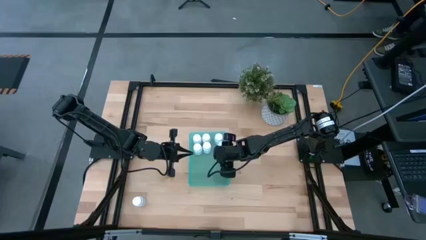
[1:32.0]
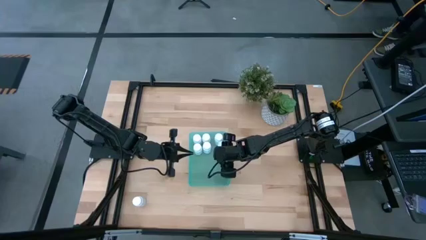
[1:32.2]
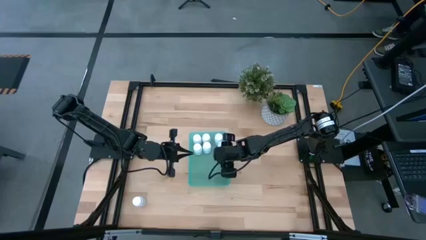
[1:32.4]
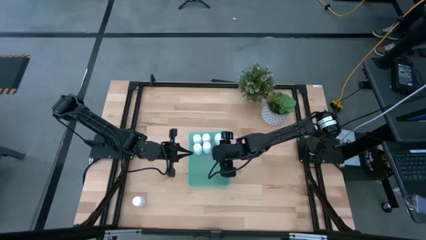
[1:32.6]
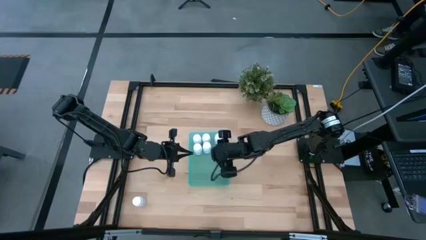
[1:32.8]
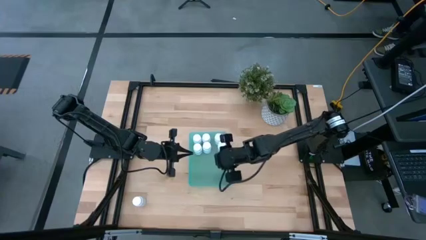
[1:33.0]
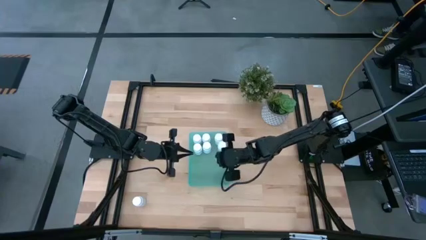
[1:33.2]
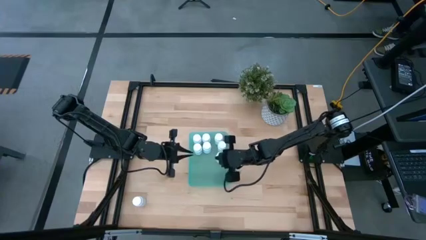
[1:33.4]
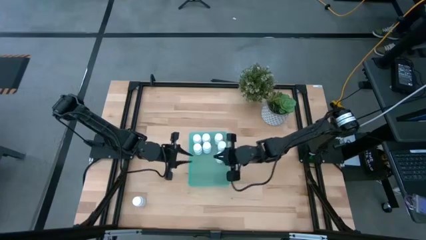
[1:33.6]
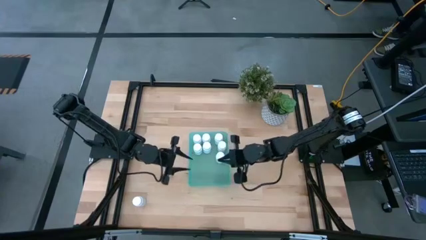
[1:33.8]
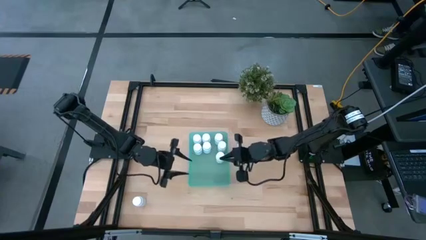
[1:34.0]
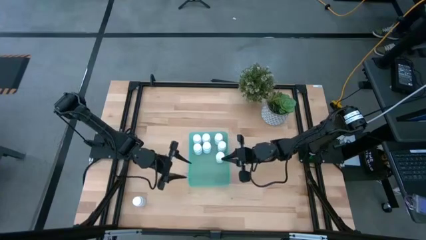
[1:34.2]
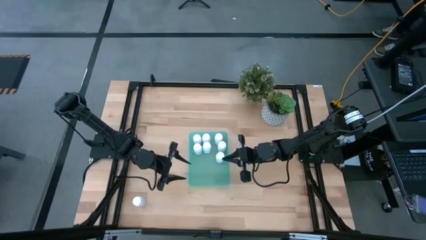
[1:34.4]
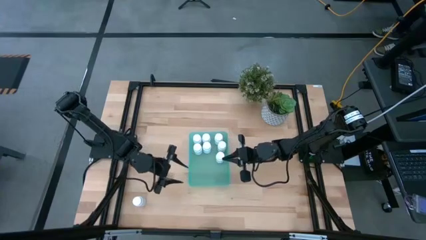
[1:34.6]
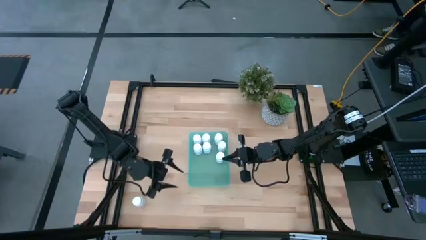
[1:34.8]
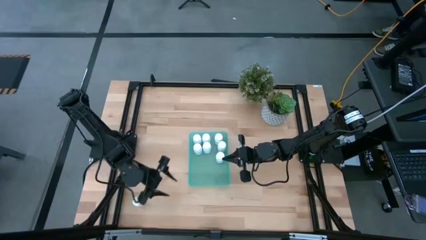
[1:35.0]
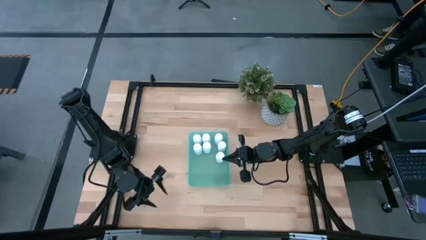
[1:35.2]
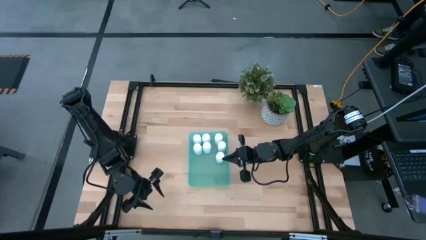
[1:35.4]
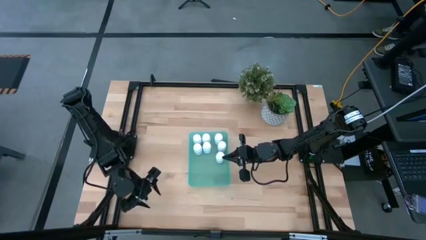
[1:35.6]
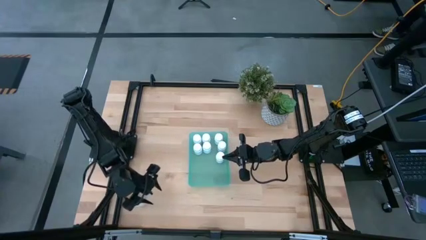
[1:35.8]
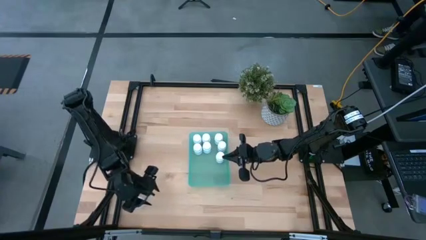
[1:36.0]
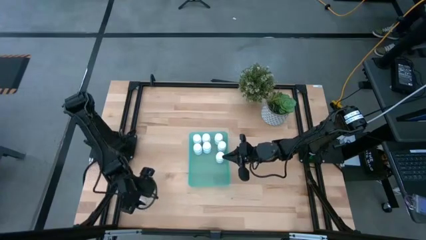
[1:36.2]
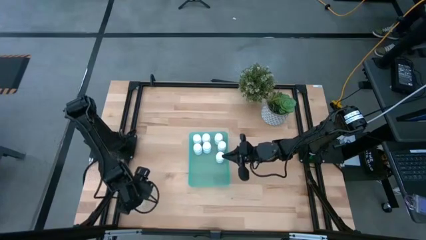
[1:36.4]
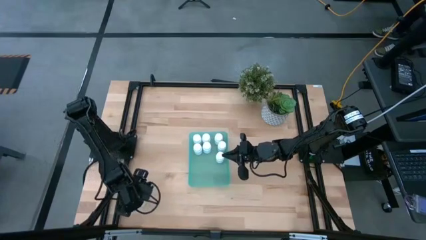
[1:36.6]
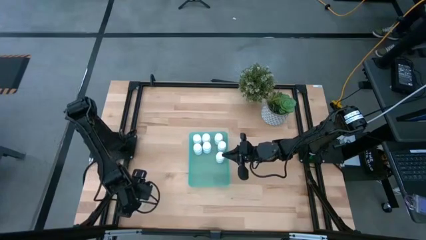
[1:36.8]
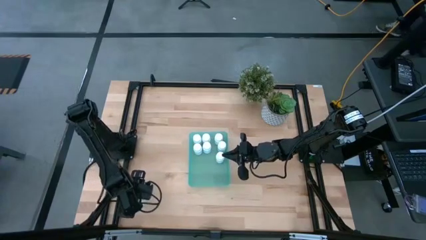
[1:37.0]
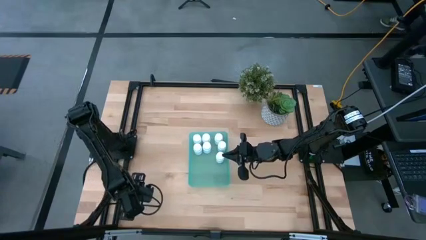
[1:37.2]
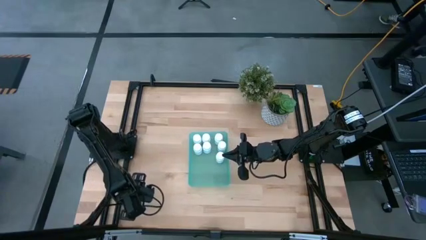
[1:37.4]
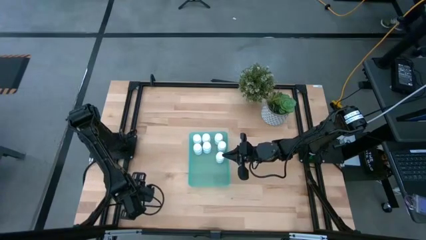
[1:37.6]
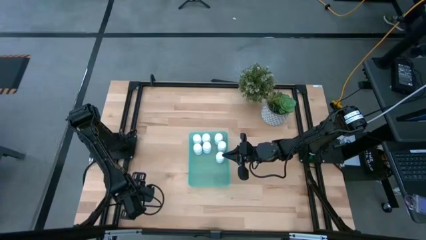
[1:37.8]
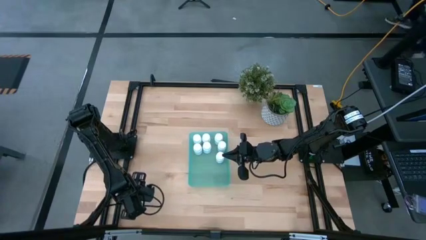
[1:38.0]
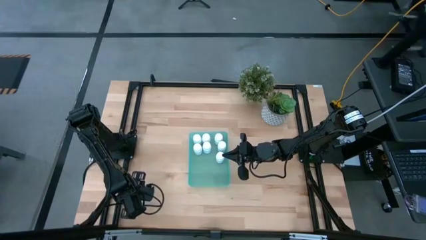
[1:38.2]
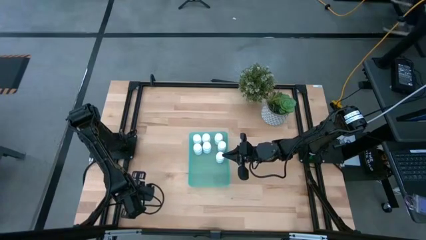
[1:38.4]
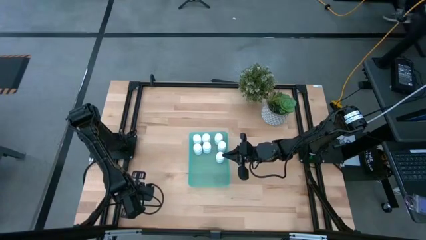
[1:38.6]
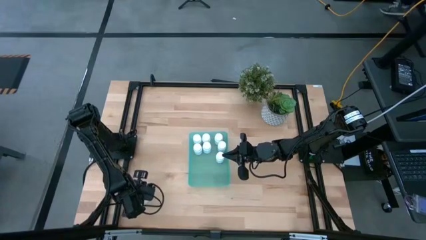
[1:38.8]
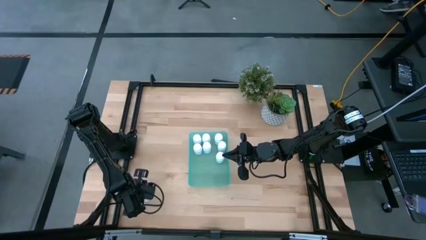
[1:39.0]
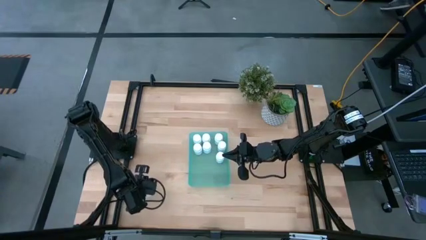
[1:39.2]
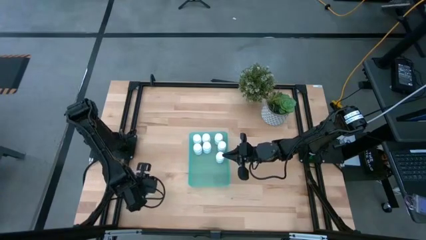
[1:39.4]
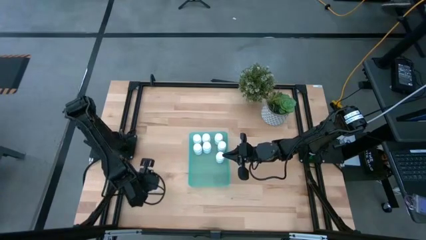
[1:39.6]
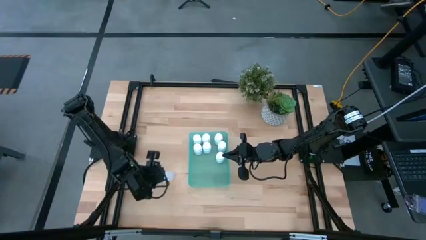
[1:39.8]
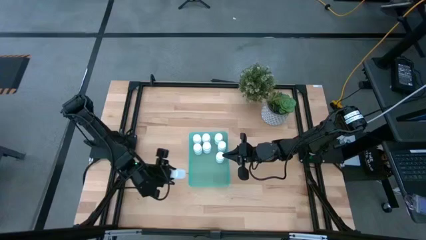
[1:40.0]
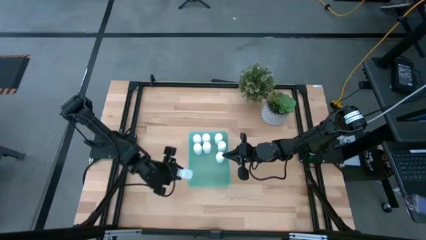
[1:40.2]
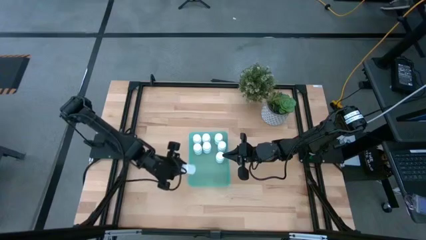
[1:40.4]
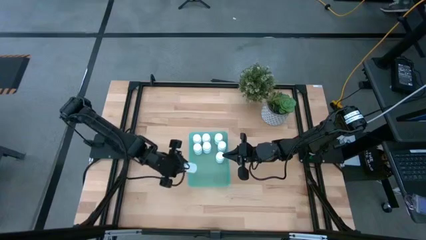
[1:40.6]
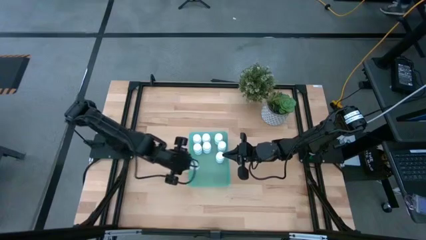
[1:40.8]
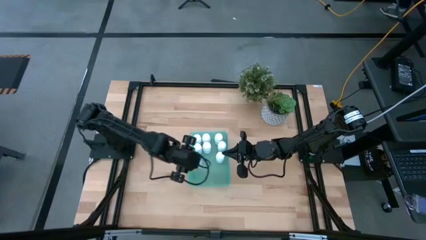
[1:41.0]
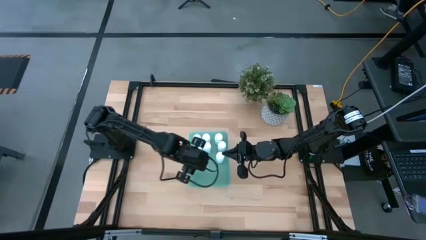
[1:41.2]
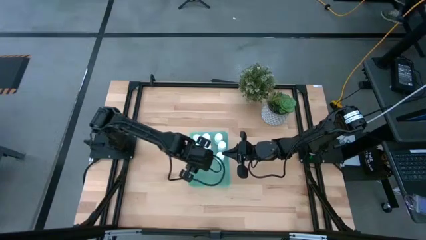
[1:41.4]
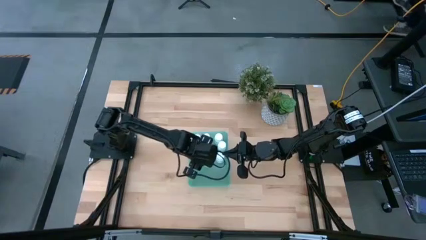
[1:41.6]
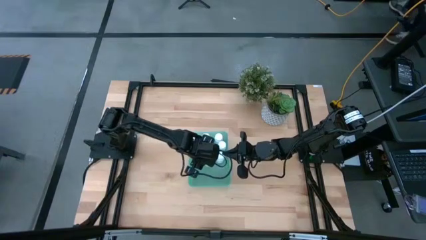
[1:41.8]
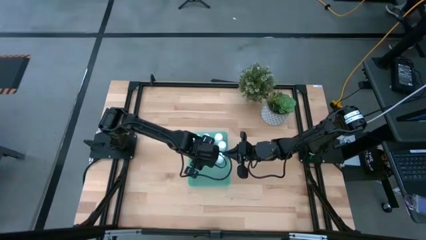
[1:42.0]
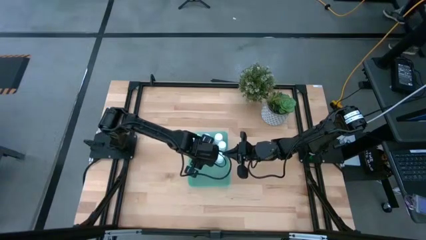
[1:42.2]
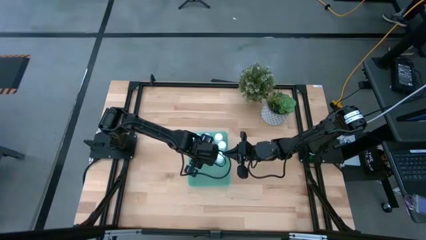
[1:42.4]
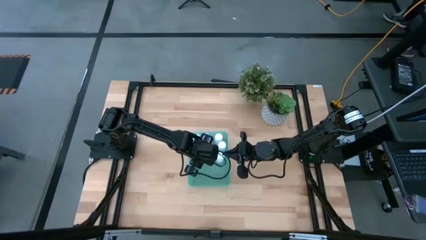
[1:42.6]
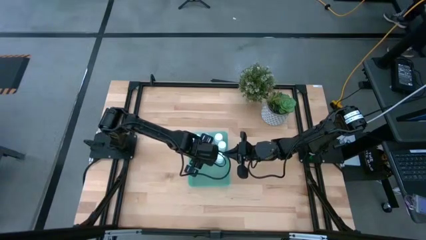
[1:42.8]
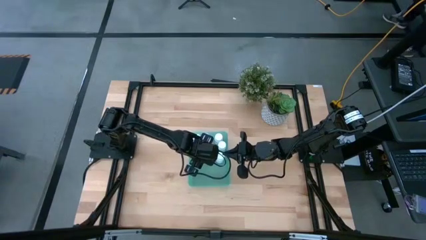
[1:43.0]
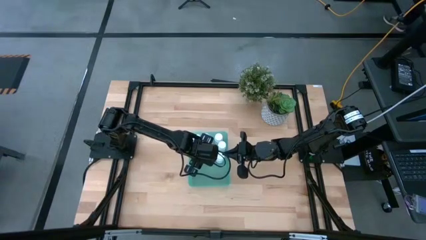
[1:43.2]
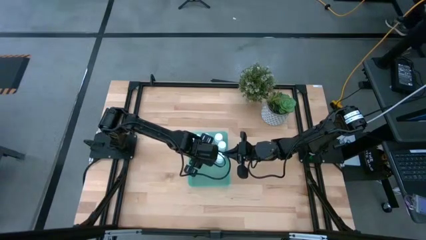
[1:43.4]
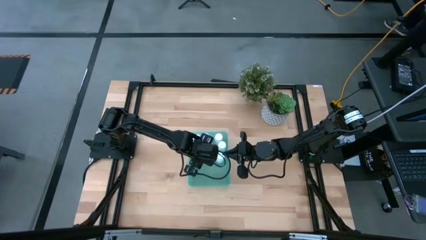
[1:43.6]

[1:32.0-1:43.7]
Task: Pick and place pill bottles into a basket
Put the white pill bottle into the green bin

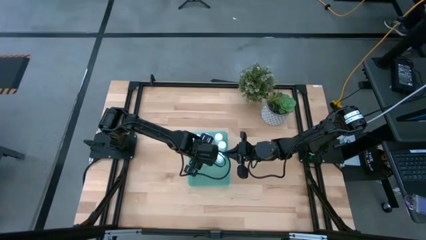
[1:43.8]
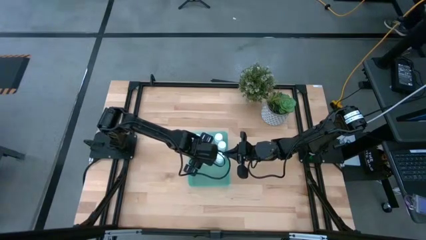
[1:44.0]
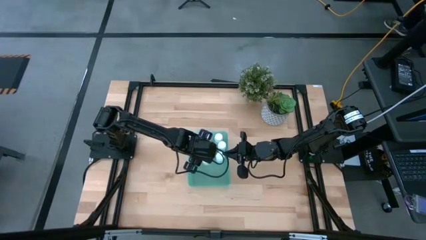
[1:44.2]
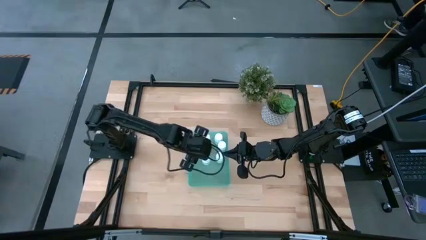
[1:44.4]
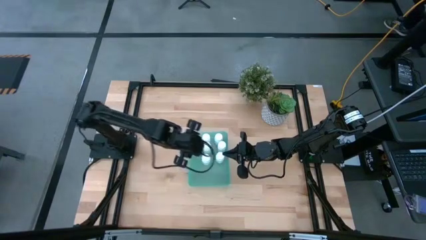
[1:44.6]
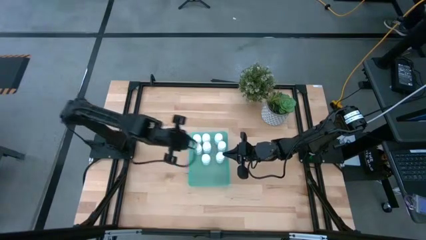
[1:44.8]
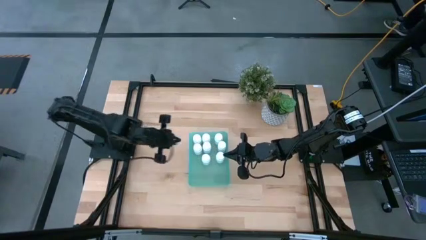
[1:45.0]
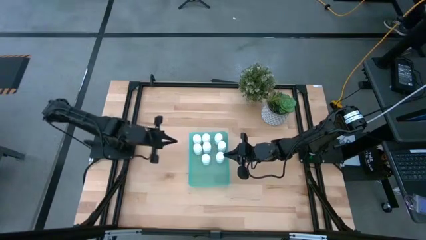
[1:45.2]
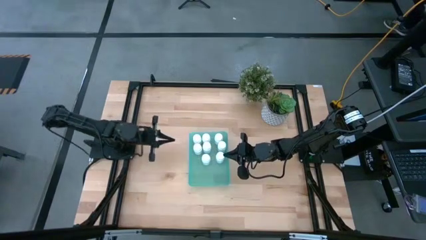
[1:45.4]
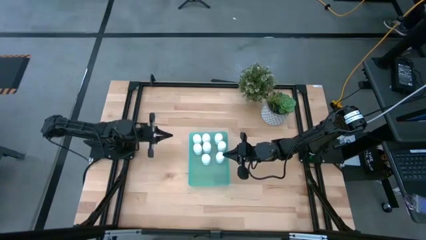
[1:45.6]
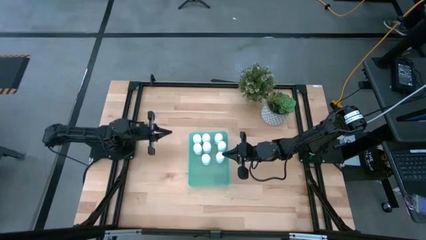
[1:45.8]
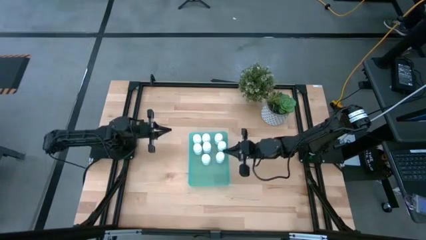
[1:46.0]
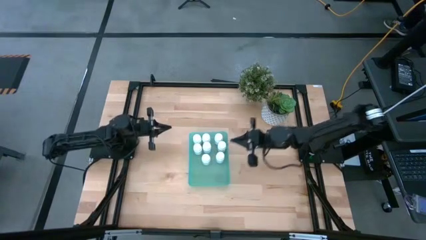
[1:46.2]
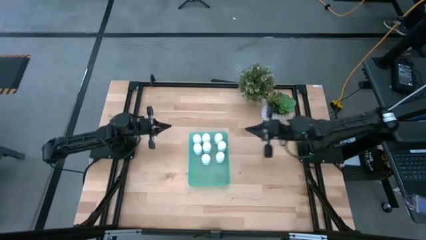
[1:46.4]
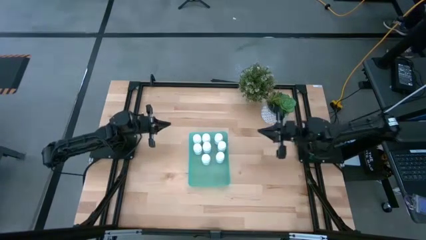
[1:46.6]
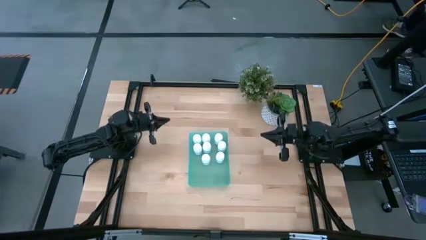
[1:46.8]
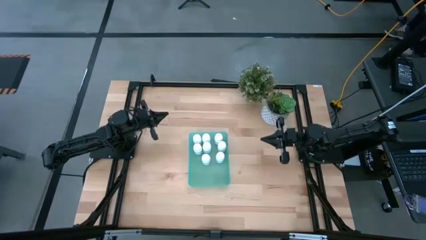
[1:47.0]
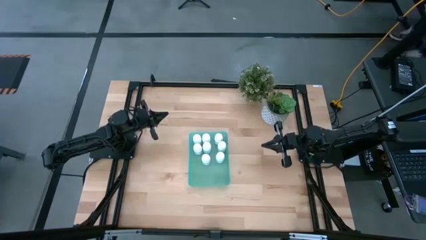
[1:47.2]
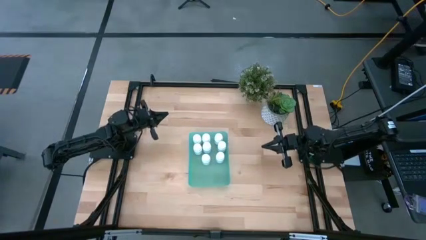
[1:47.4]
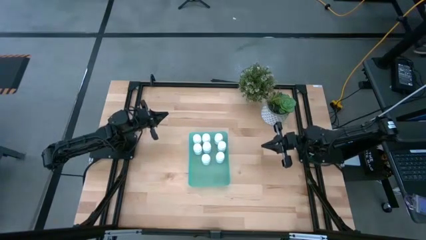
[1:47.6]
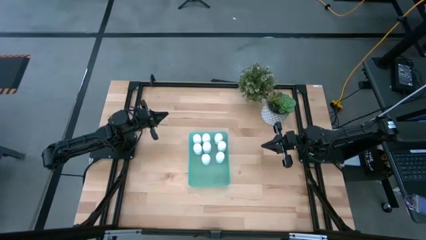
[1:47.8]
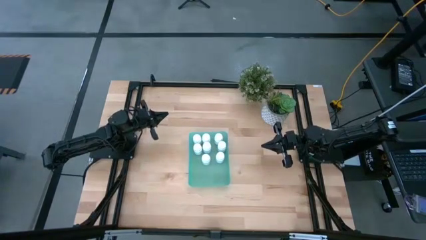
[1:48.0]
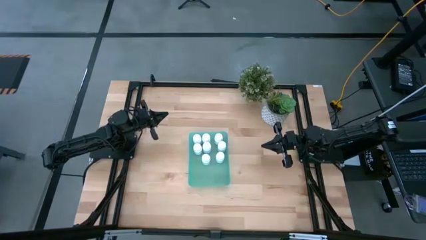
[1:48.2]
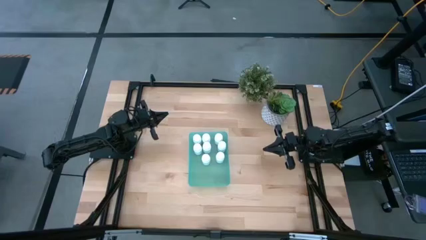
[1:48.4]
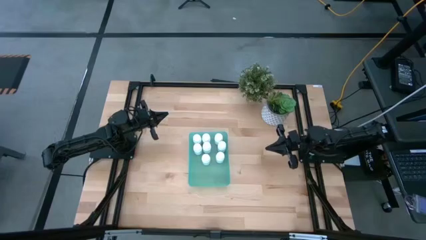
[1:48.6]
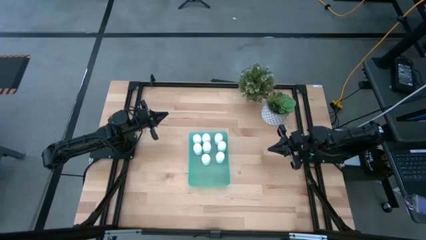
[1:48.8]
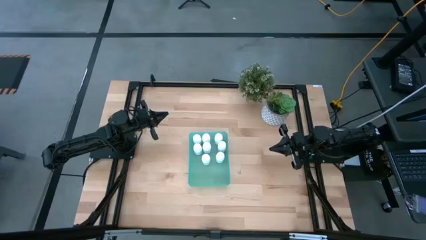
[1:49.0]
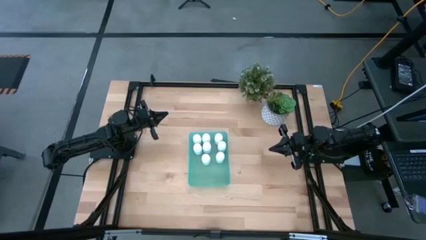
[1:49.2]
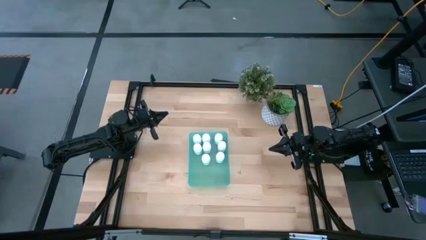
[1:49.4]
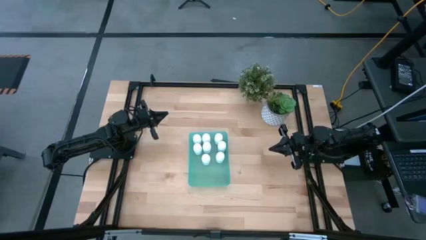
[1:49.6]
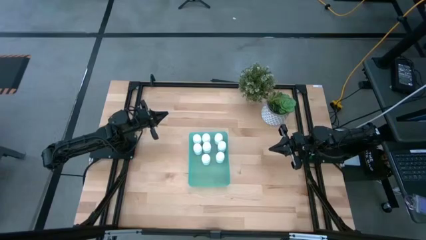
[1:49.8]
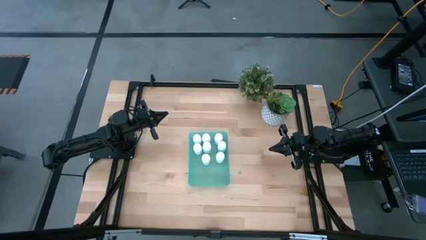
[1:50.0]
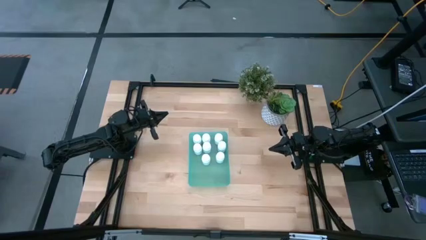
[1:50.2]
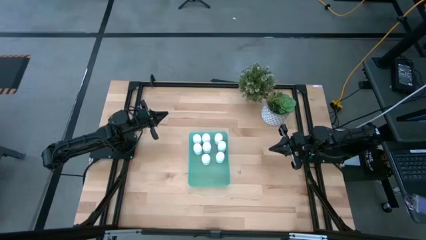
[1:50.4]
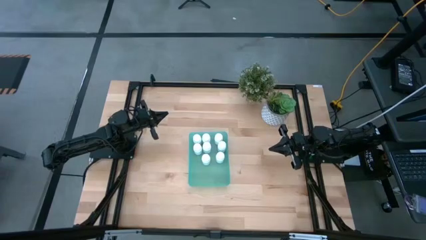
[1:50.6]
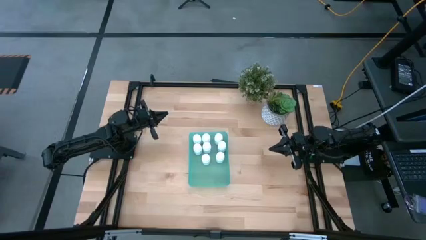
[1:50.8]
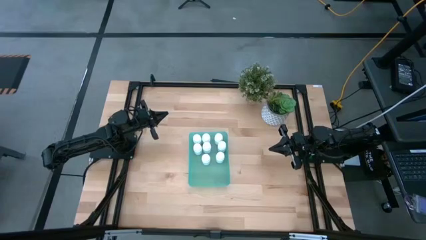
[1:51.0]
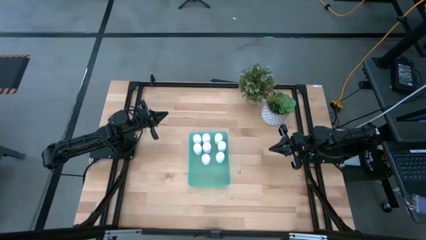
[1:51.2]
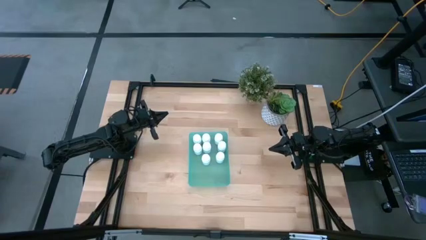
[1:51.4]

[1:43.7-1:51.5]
Return to Home Position
